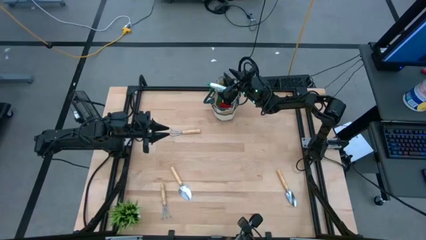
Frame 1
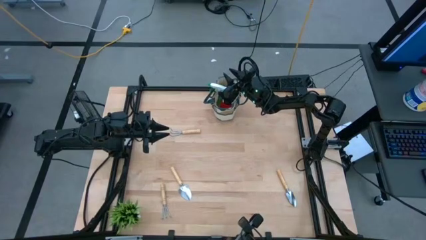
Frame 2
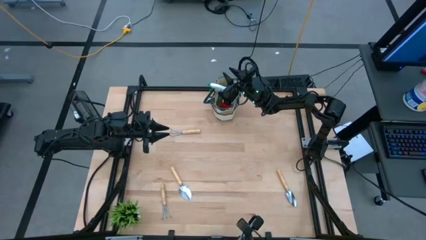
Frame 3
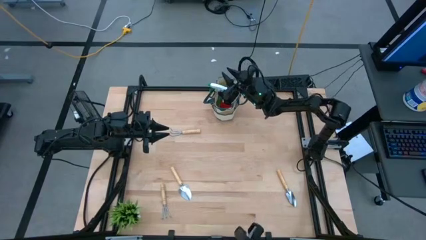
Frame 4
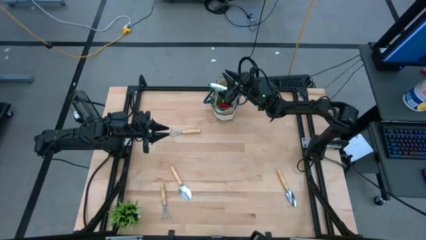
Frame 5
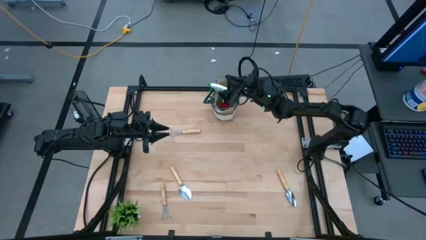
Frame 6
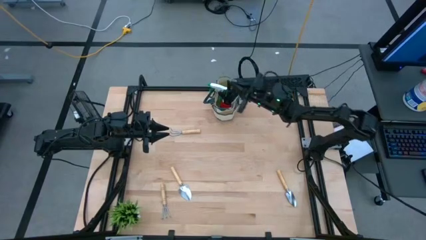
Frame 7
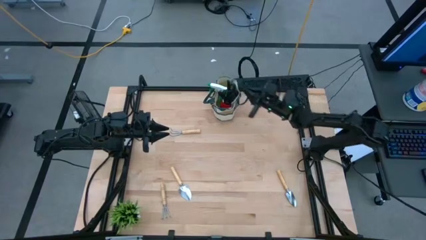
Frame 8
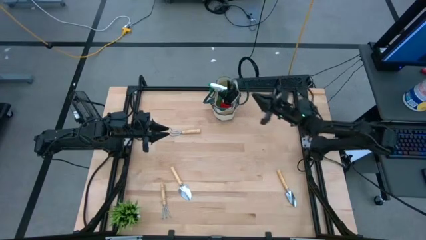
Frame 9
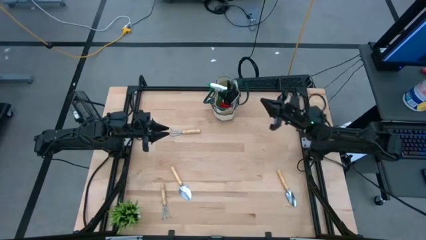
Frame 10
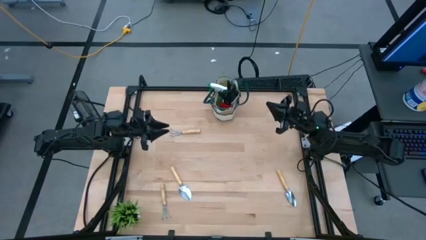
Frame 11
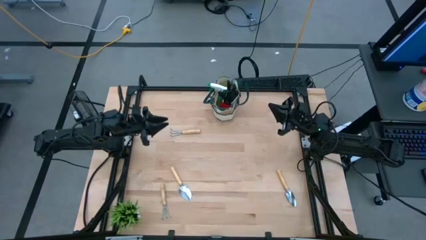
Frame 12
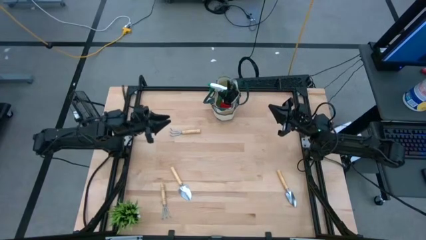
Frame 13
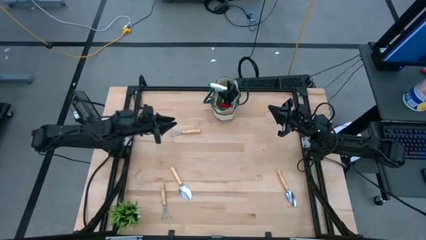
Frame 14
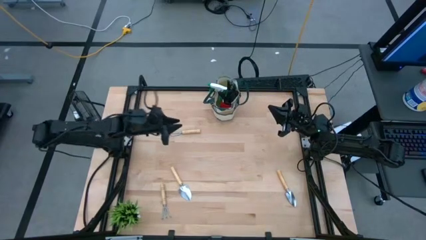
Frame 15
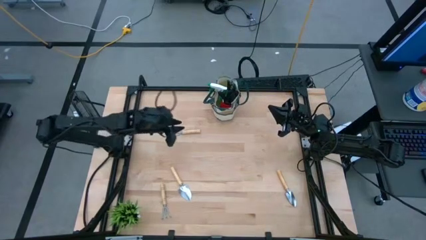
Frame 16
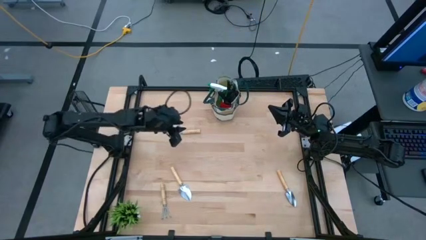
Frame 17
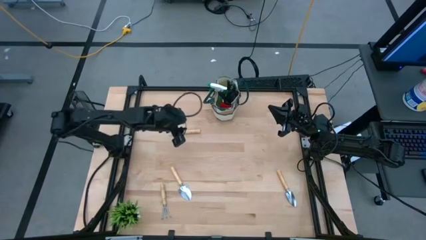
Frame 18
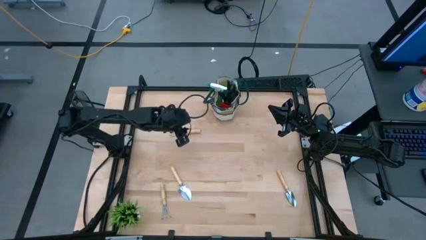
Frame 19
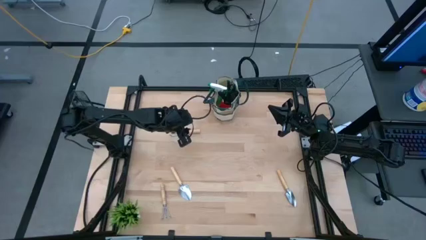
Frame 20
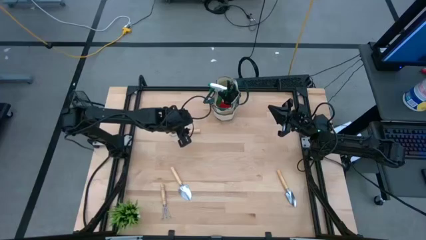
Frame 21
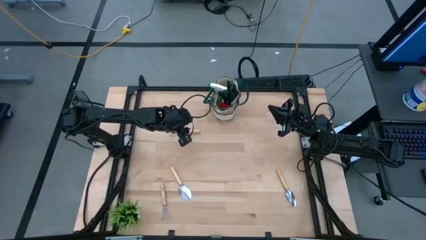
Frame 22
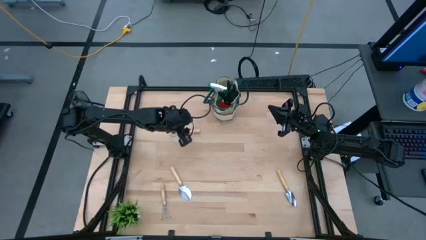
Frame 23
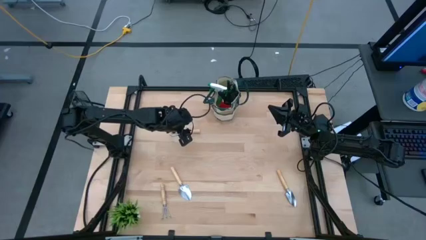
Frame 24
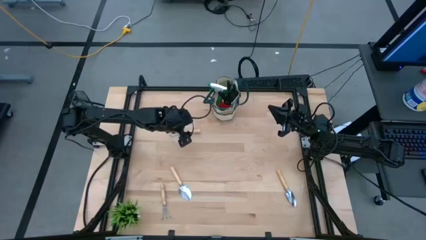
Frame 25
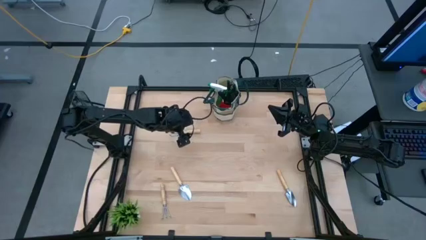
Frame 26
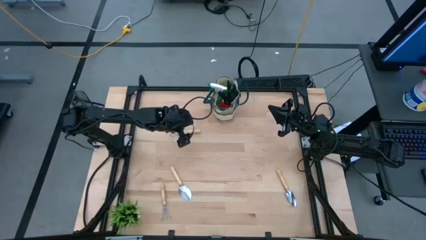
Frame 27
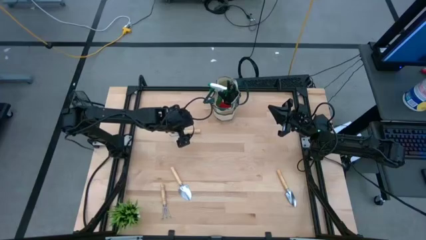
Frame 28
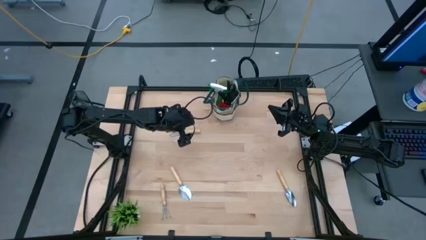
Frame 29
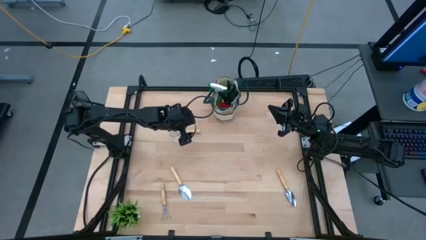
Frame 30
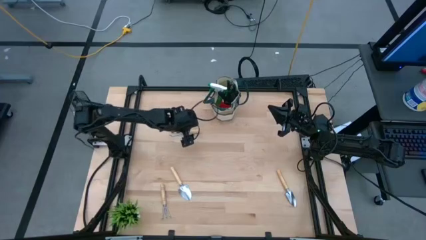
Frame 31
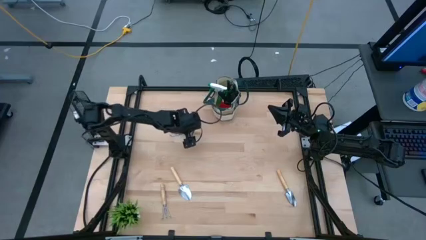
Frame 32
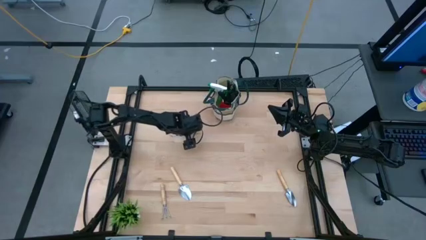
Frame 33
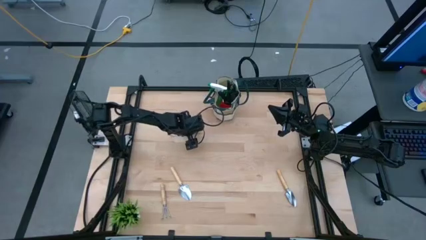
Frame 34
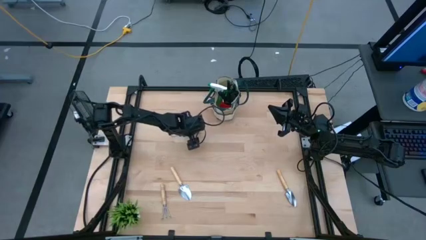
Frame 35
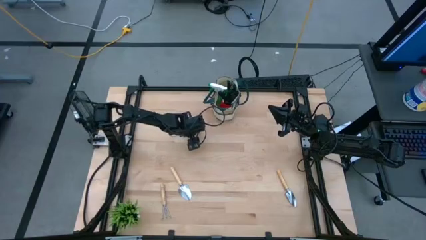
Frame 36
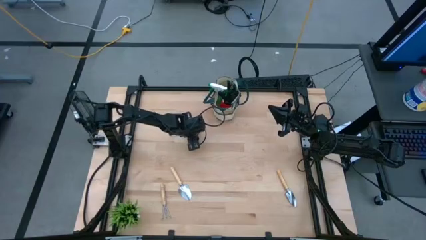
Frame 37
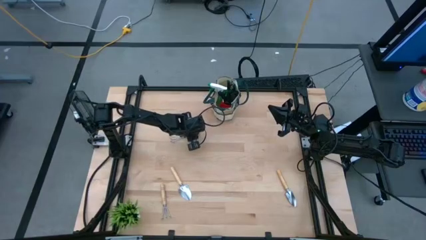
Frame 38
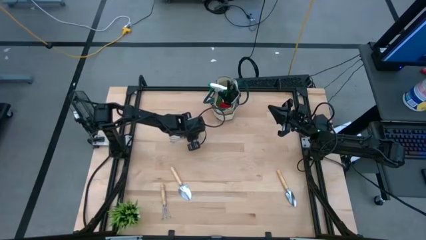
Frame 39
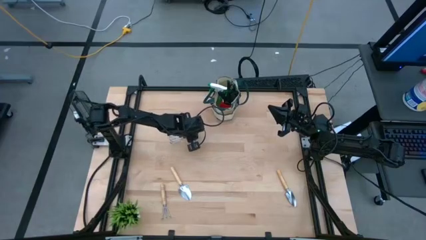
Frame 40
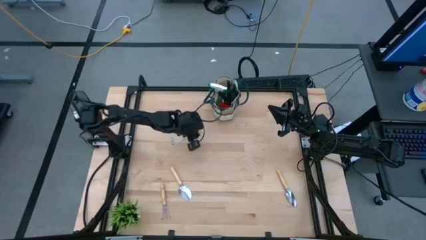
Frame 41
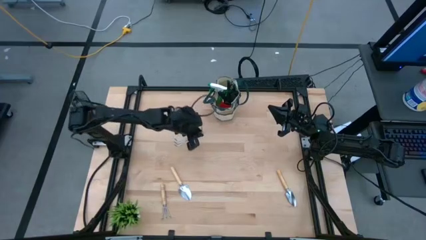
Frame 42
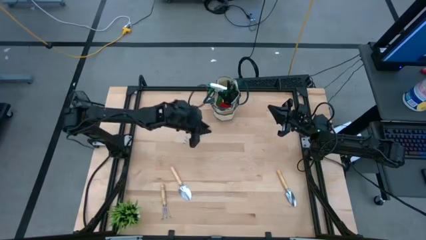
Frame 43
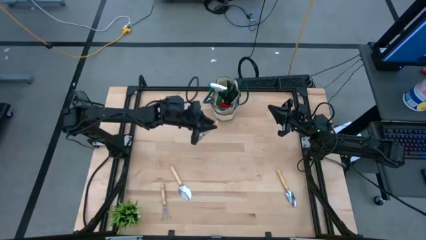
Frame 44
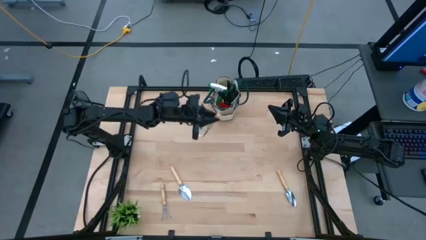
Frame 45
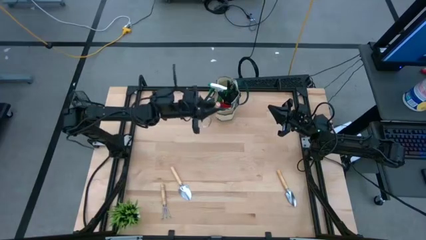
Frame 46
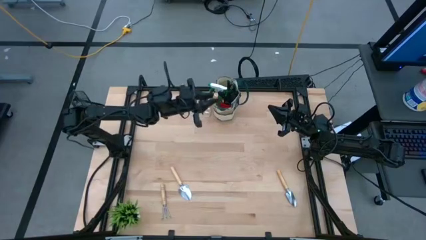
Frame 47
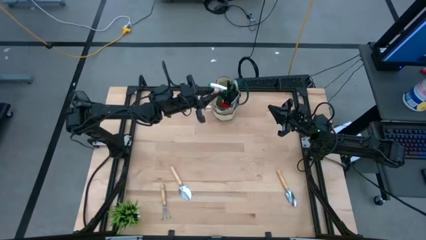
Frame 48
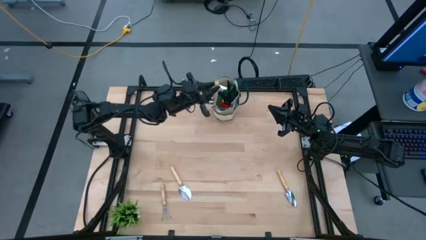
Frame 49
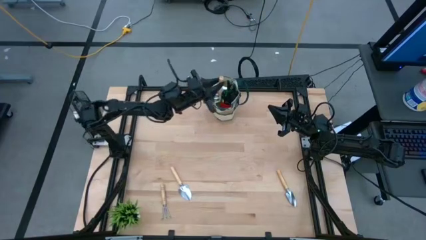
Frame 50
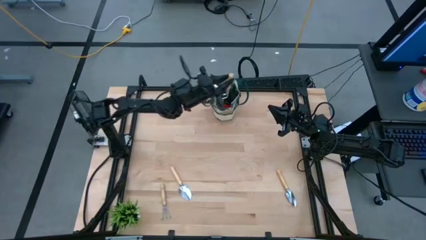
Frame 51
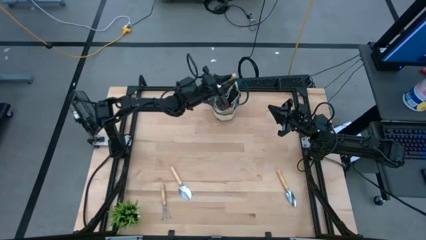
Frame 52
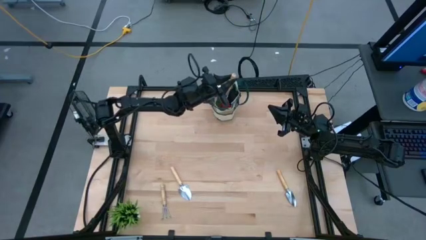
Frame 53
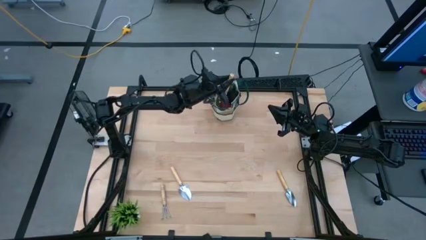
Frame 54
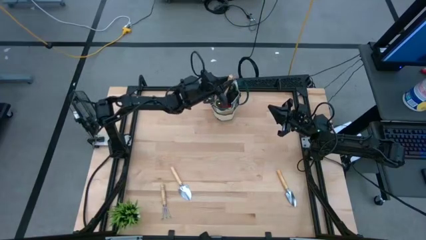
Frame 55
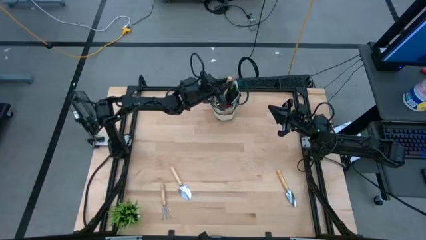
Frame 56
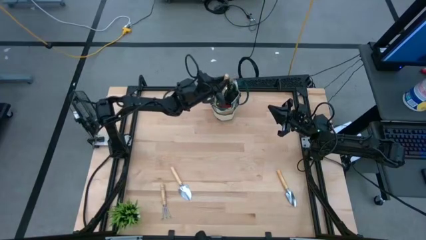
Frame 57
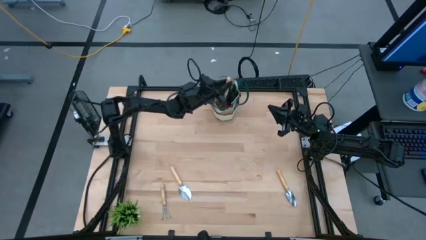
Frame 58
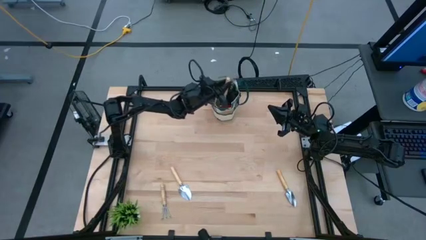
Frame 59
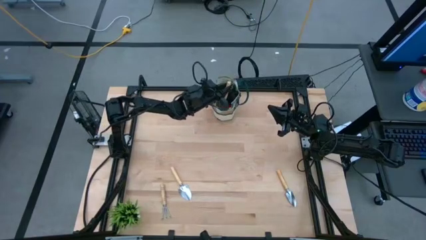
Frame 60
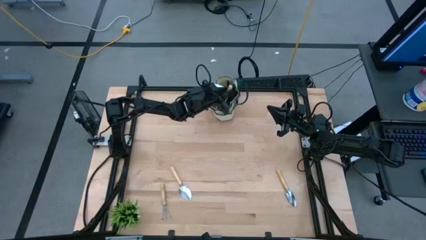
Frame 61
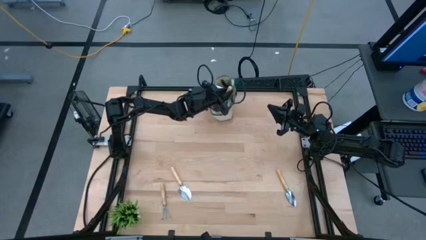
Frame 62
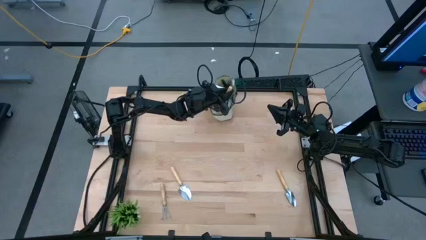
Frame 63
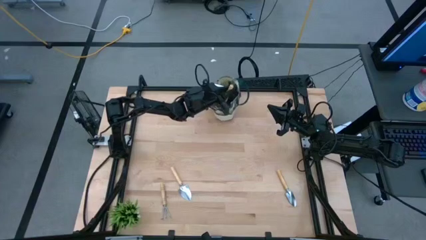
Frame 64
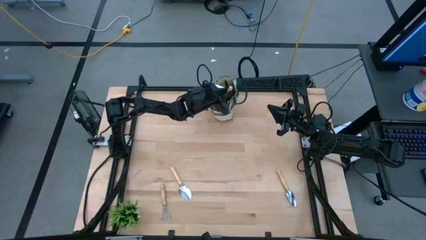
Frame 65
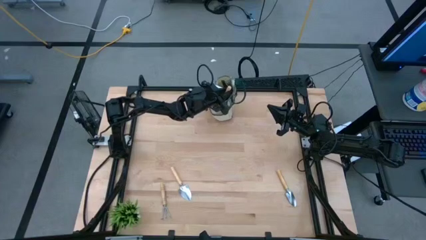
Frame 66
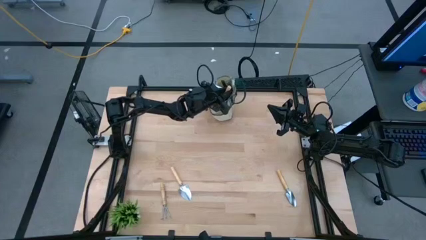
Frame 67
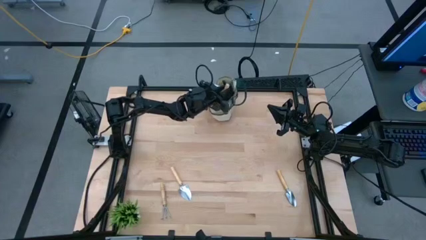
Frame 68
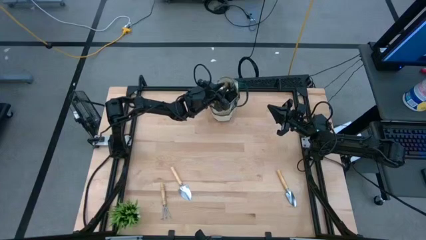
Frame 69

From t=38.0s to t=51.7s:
Task: Pick & Place Garden tools in Gardening bag
Put the top hand rake into the gardening bag

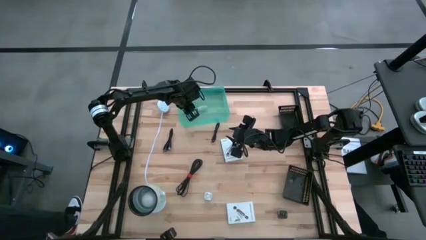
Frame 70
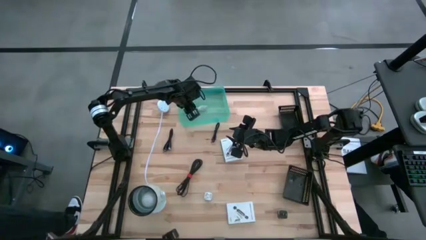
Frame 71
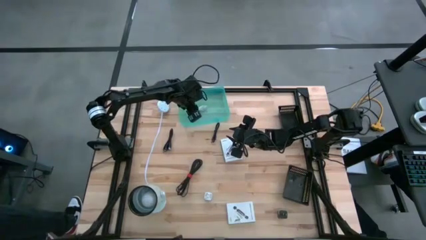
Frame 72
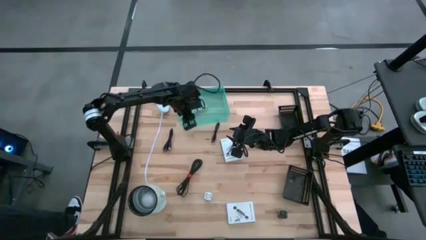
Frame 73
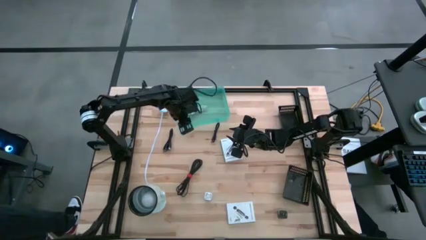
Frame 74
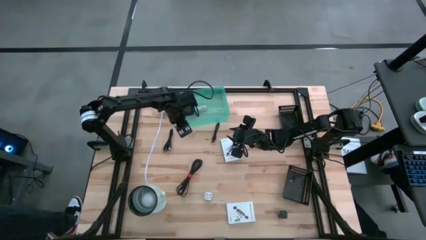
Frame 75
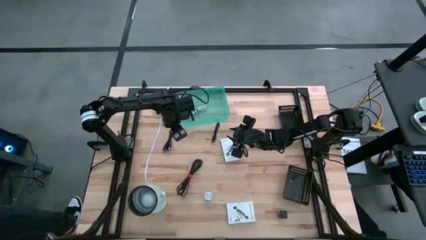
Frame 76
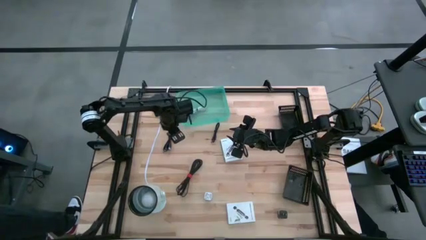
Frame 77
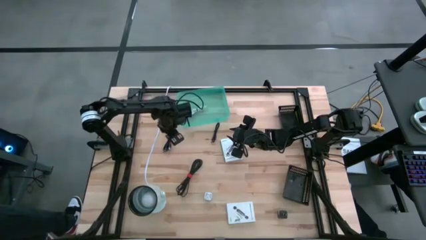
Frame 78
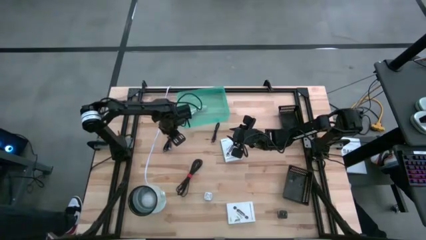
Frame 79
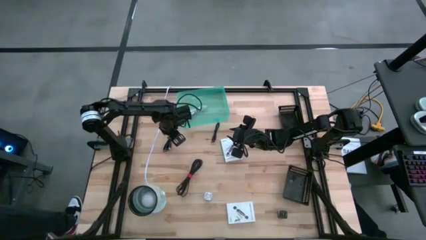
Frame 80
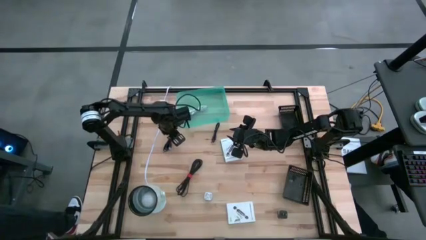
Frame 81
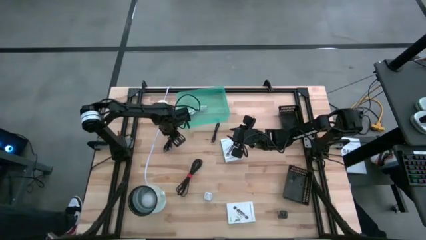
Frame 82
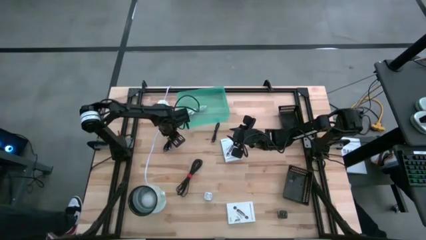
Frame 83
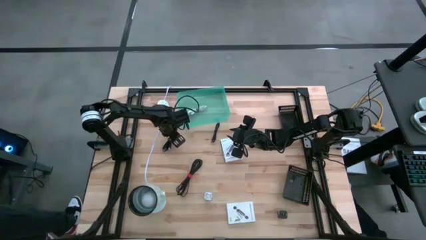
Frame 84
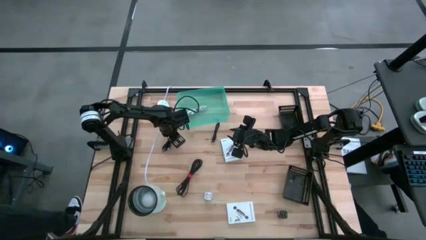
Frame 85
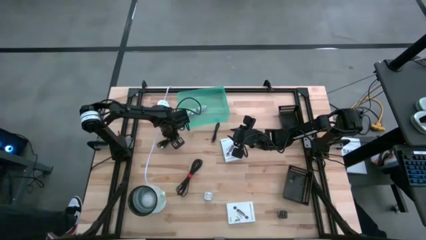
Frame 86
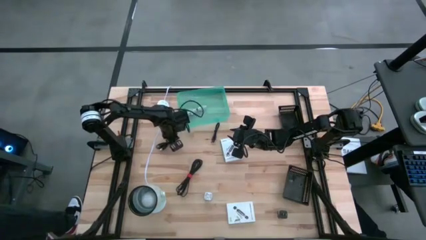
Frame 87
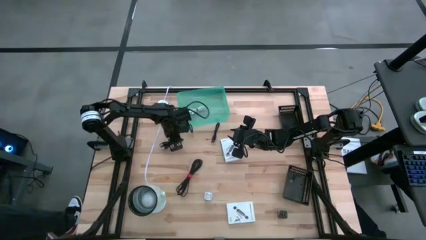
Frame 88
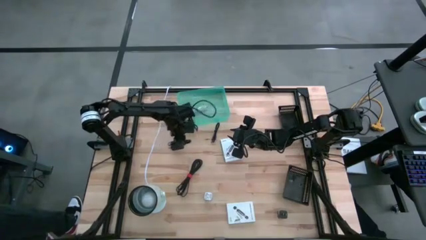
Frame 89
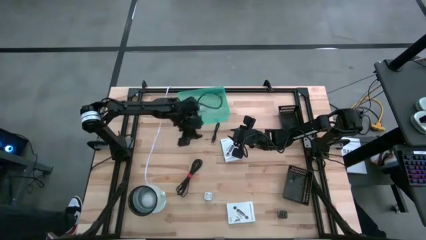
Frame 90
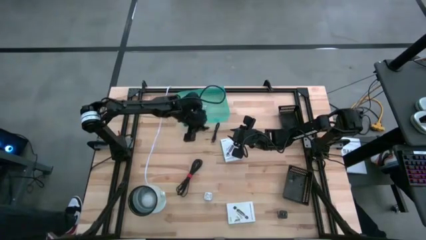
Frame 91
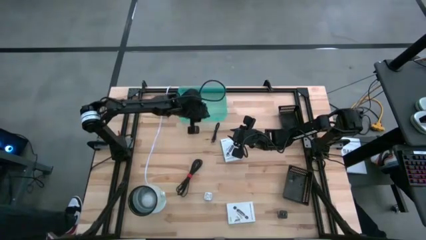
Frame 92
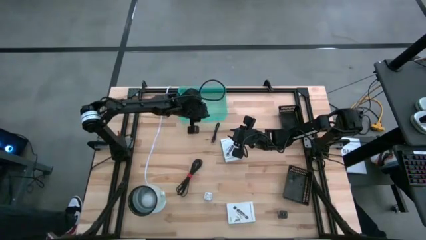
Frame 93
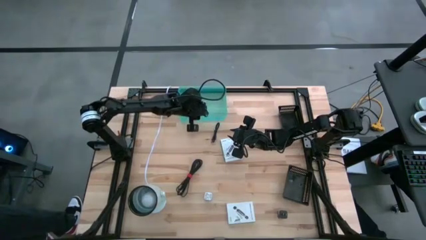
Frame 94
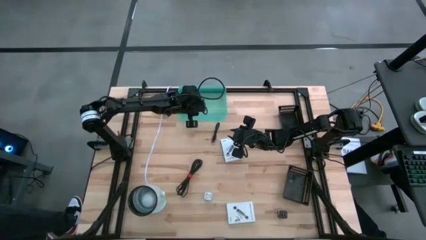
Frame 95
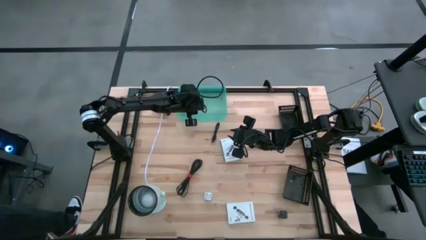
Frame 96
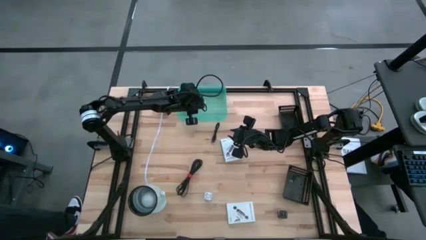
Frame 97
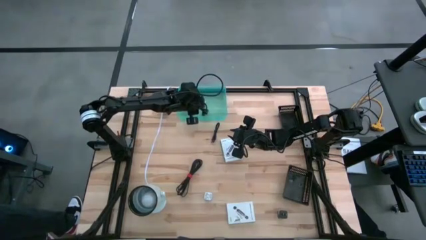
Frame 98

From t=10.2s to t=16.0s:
Task: Pick and place items into bin
Put the left black charger cable into the blue bin
